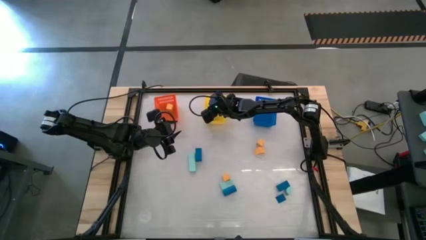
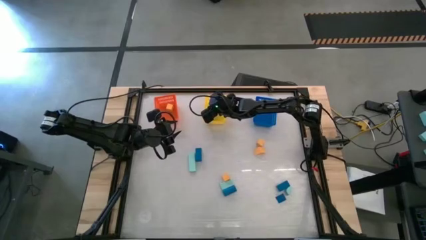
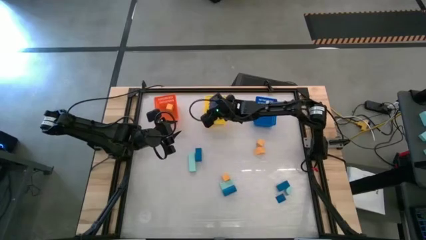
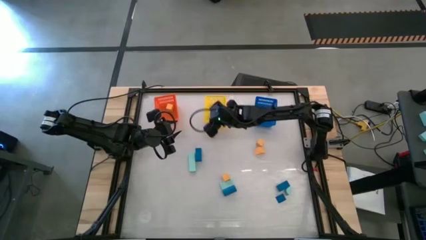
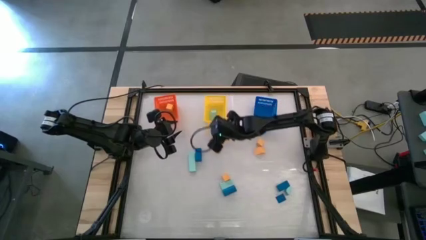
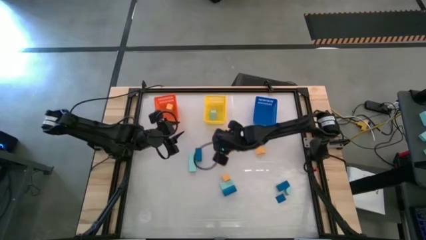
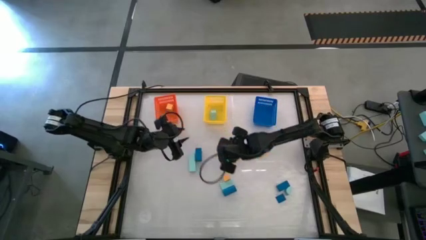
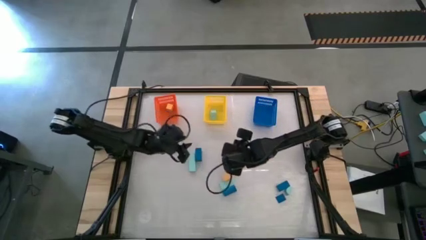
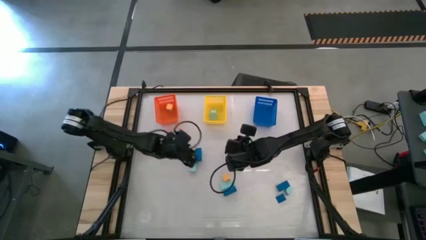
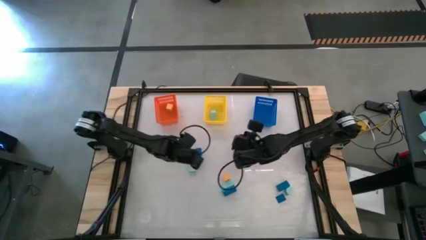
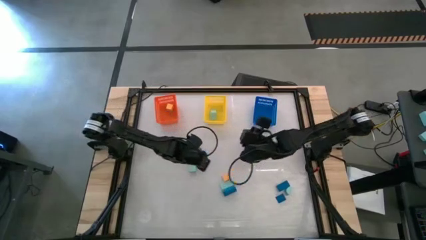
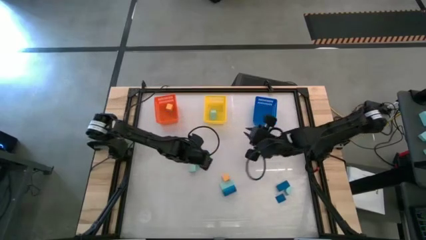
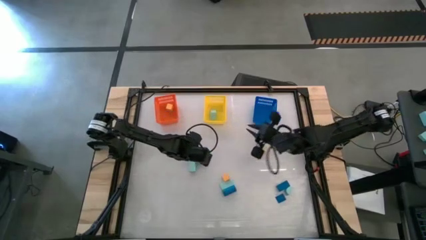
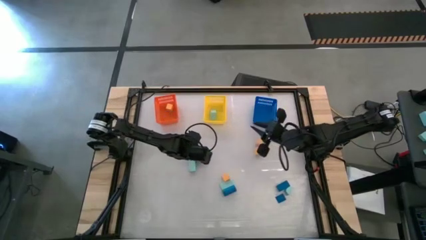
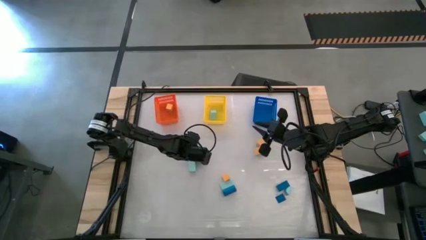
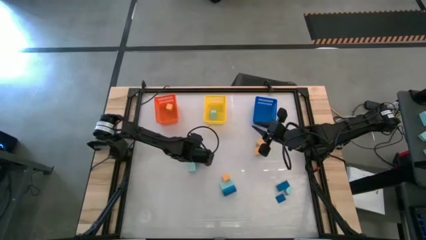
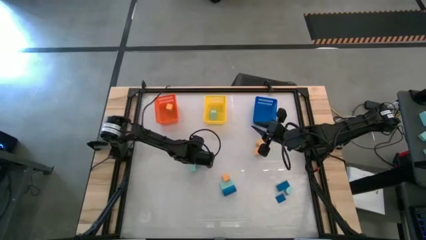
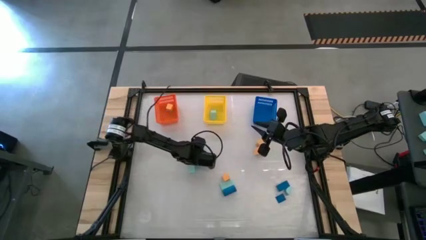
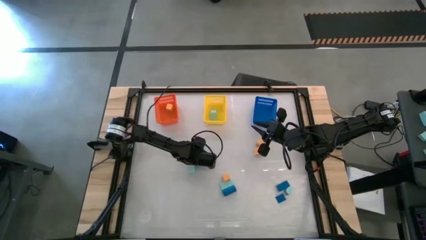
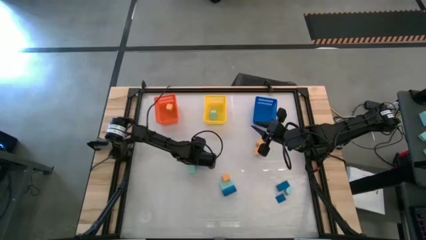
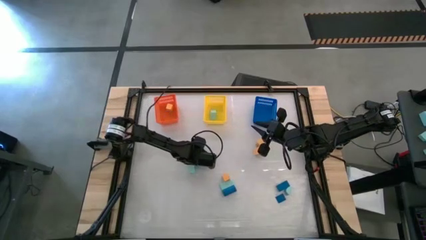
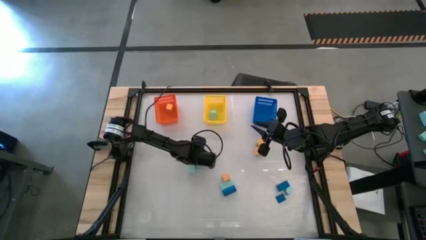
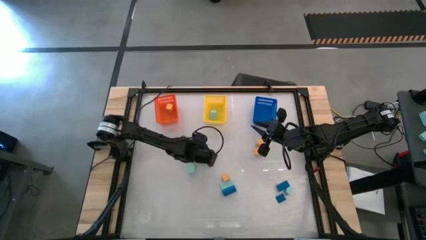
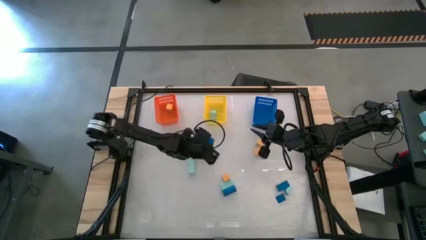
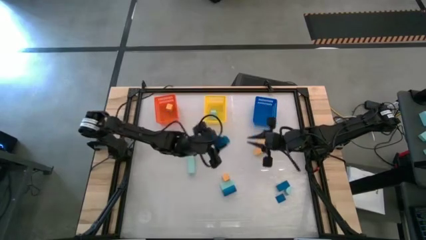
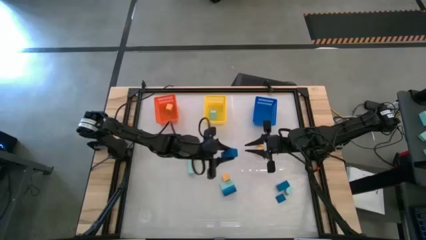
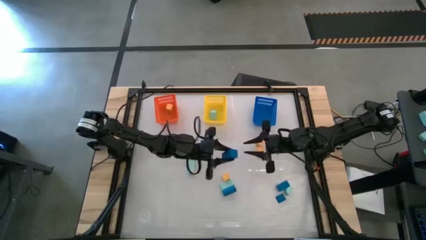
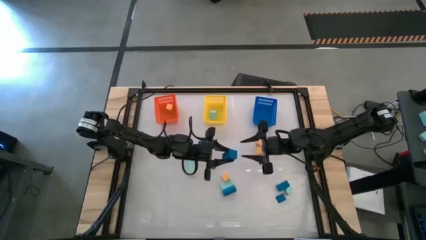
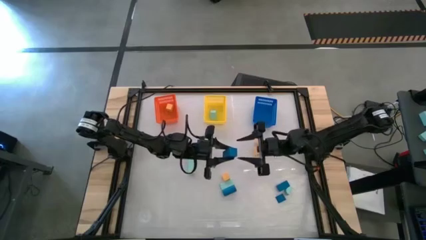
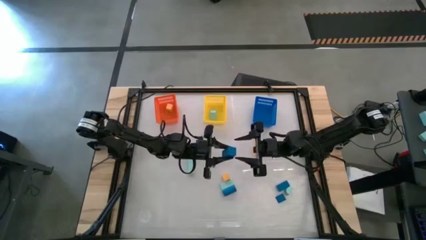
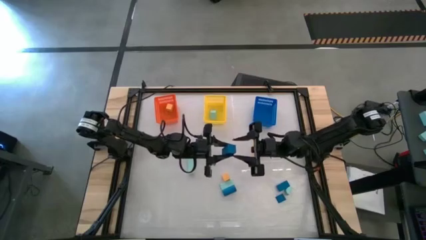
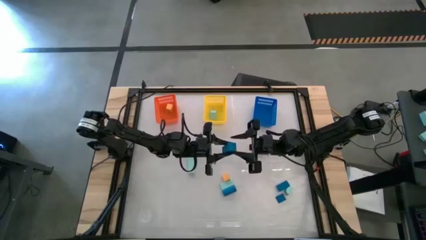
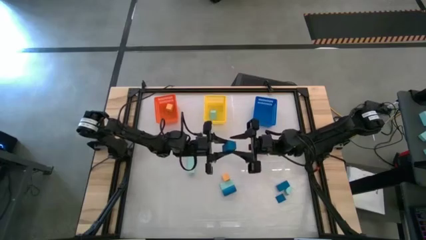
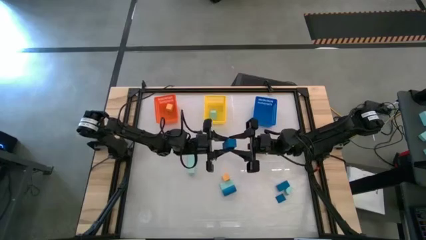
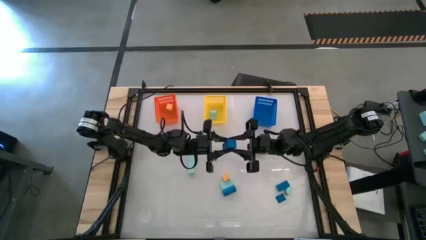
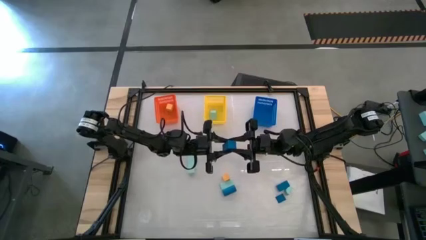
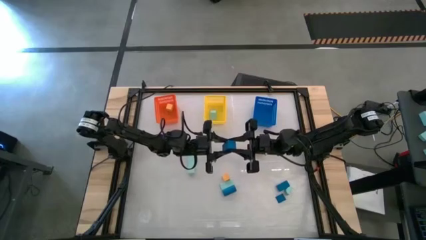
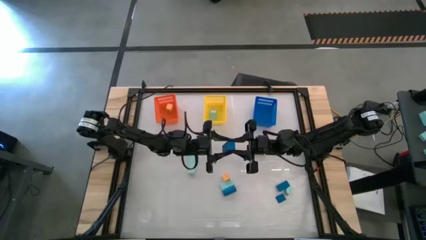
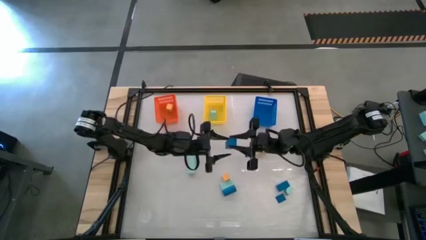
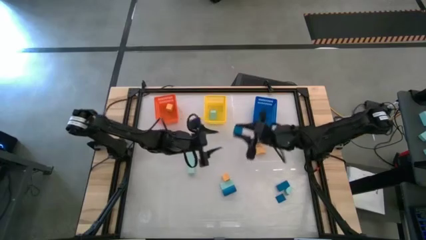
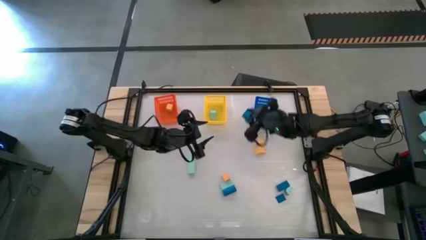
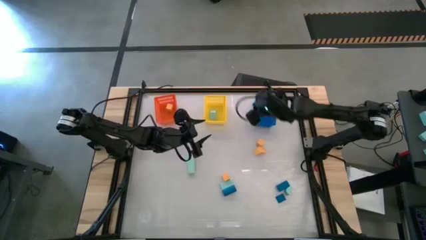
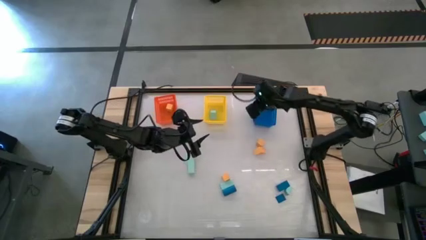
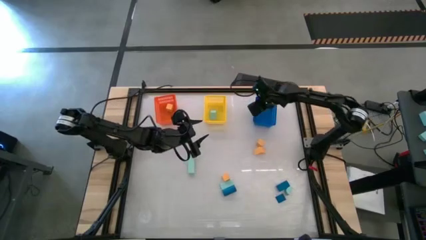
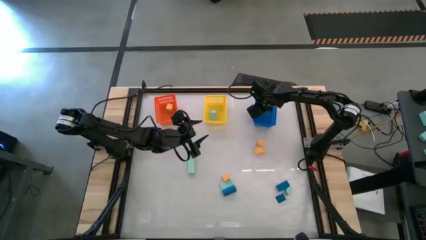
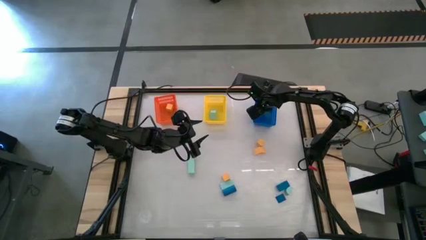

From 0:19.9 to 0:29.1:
Task: Sort & place blocks by color
Put the blue block into the blue bin

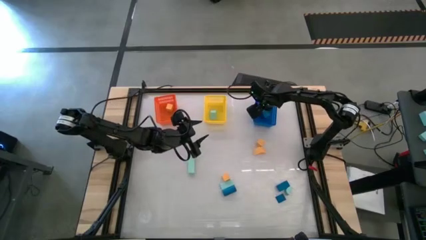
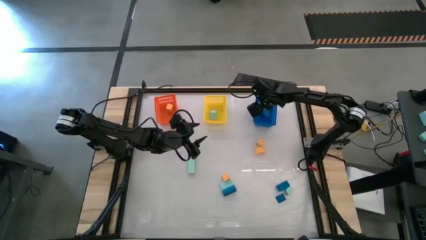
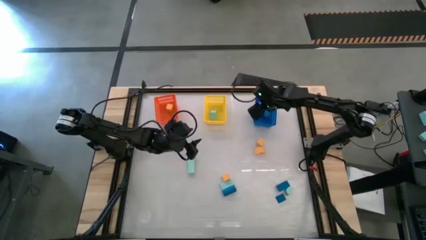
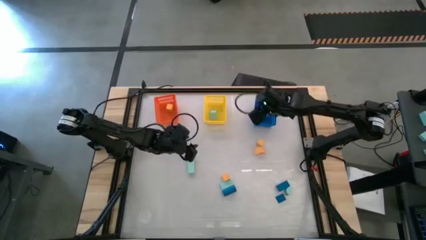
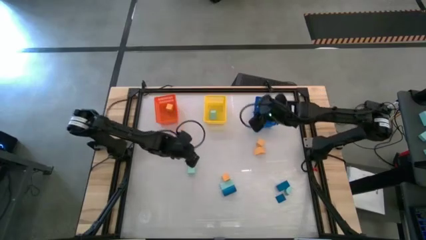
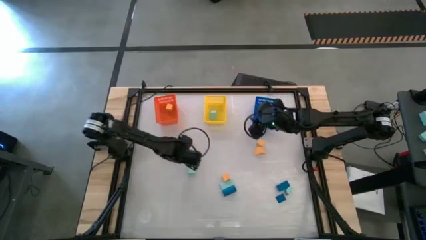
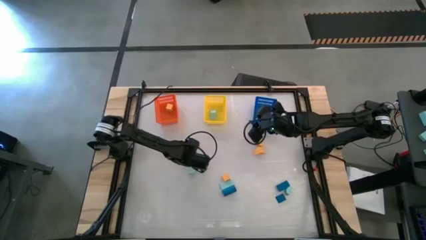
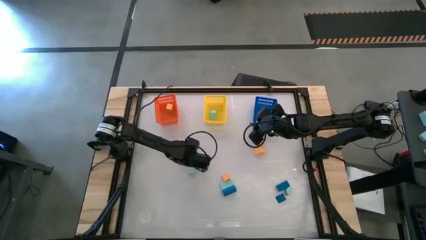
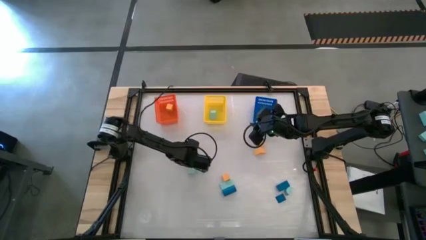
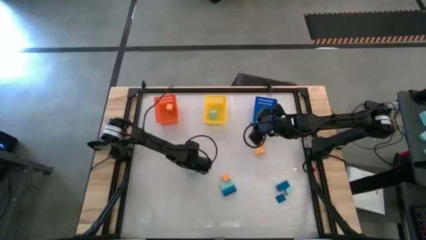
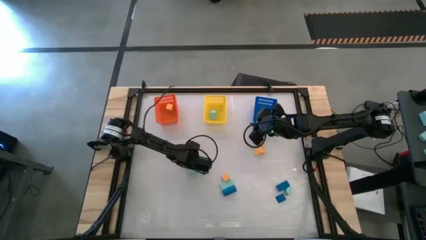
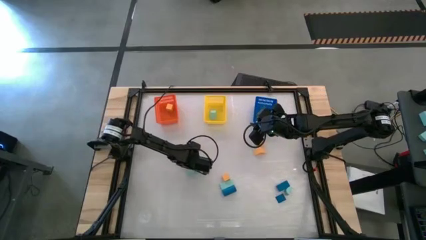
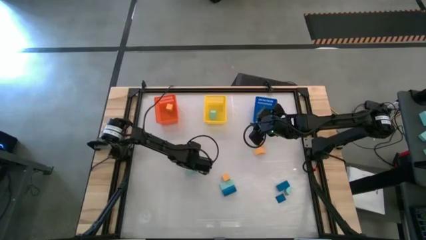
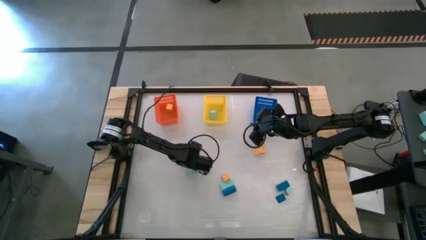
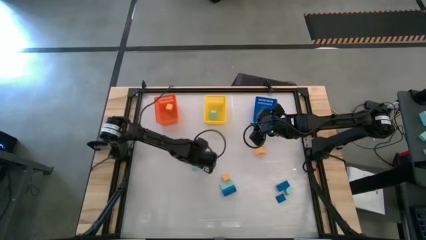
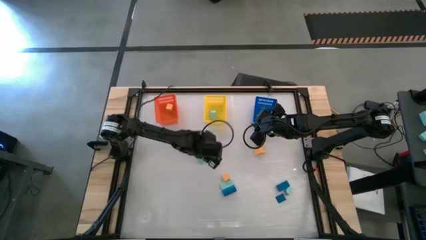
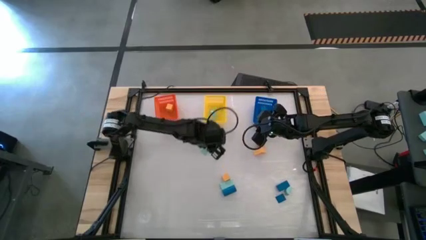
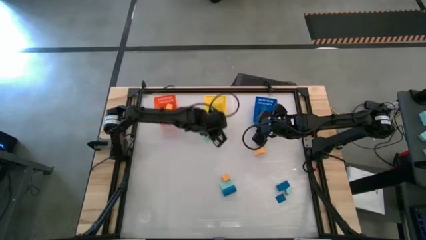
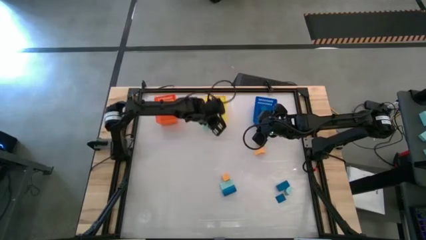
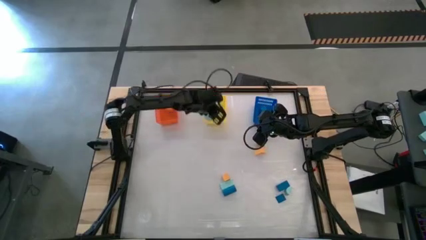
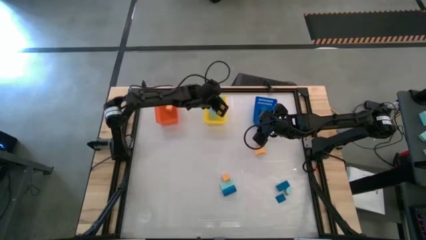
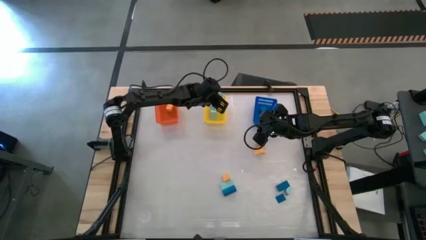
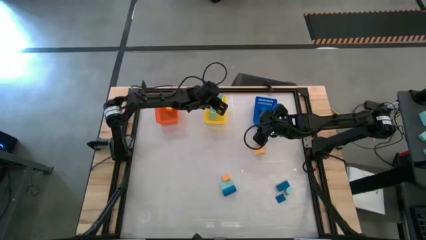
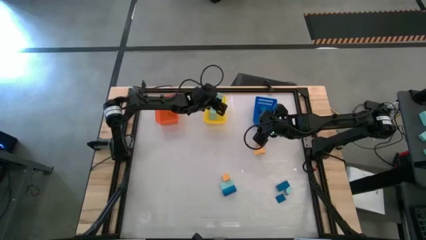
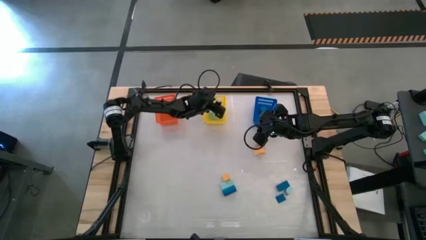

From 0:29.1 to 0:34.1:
Put the light blue block into the yellow bin
